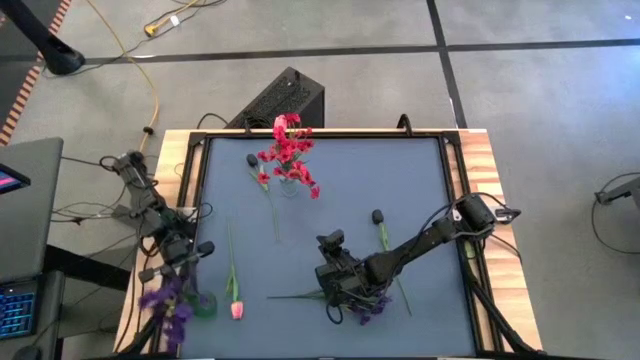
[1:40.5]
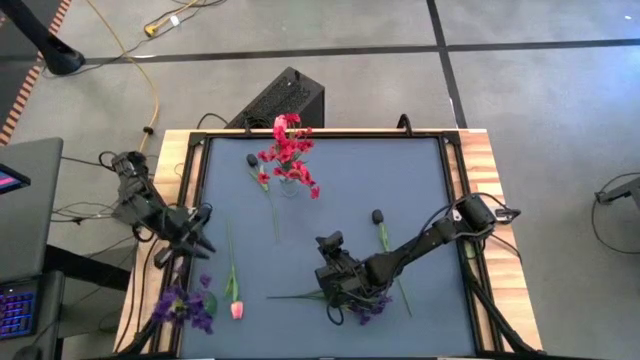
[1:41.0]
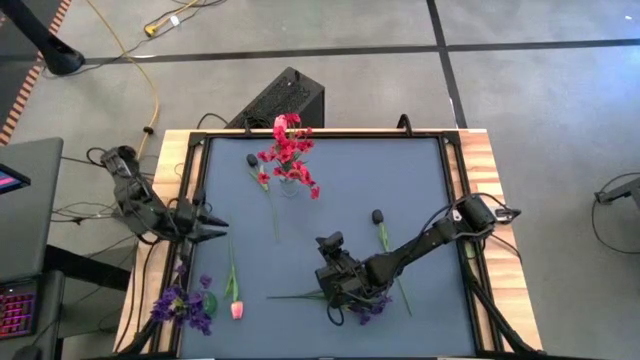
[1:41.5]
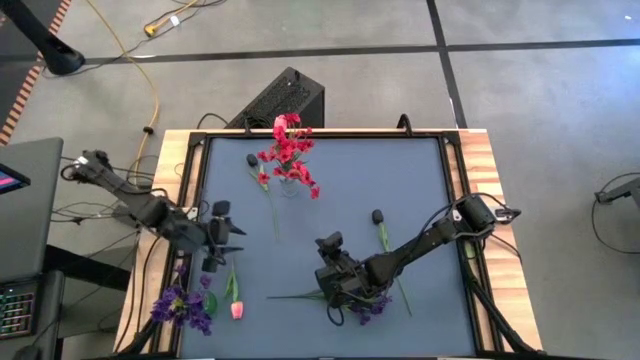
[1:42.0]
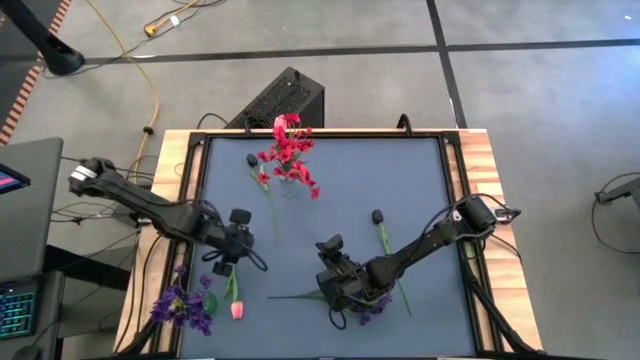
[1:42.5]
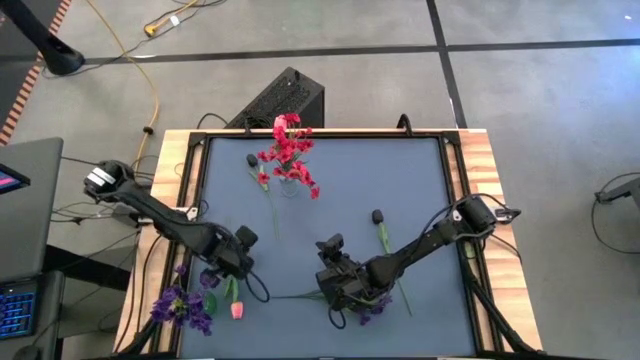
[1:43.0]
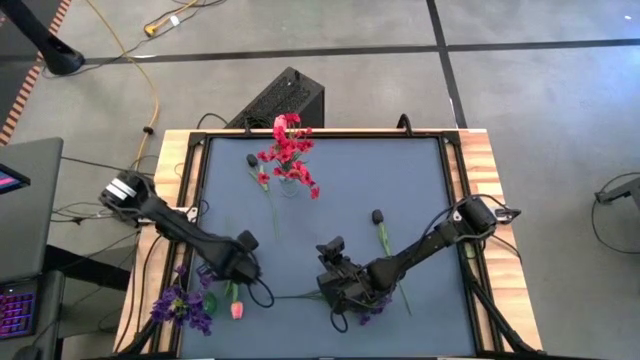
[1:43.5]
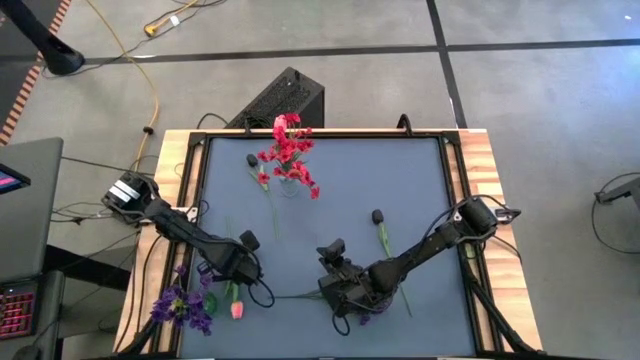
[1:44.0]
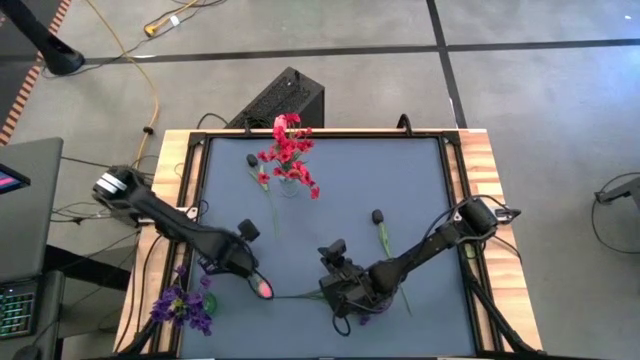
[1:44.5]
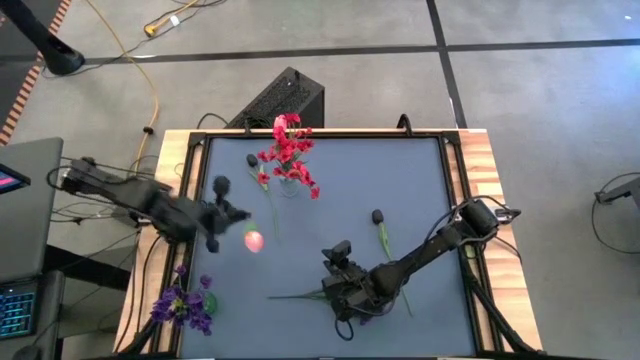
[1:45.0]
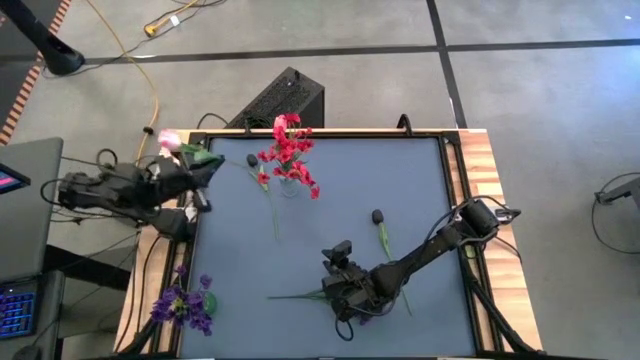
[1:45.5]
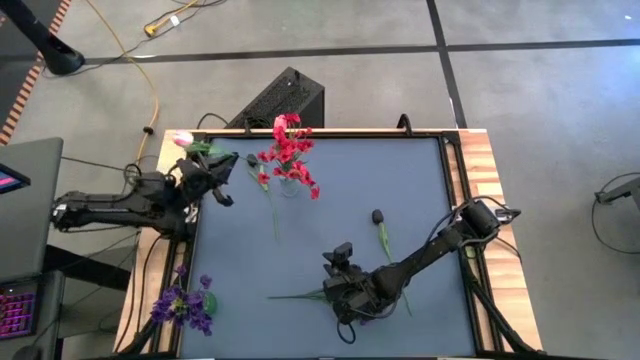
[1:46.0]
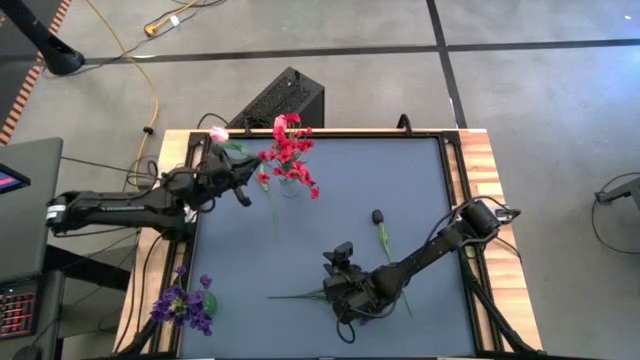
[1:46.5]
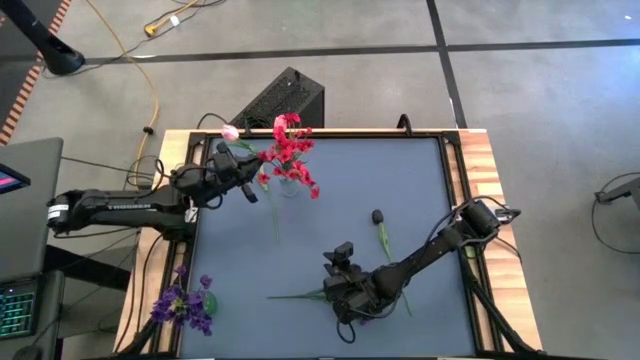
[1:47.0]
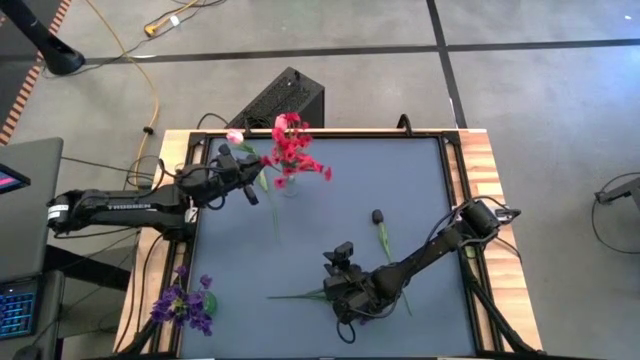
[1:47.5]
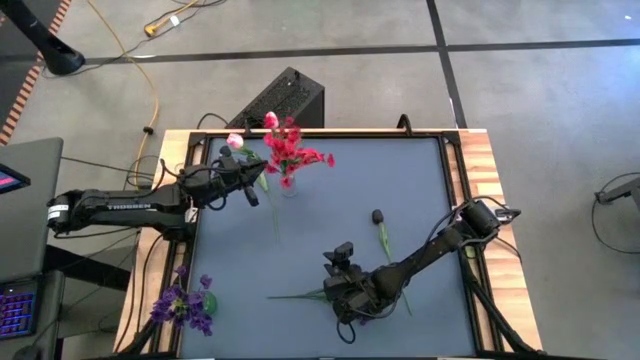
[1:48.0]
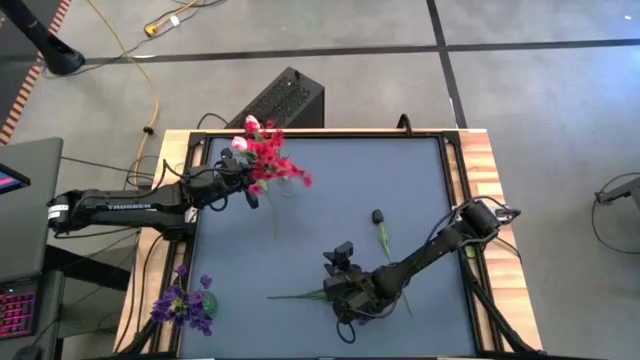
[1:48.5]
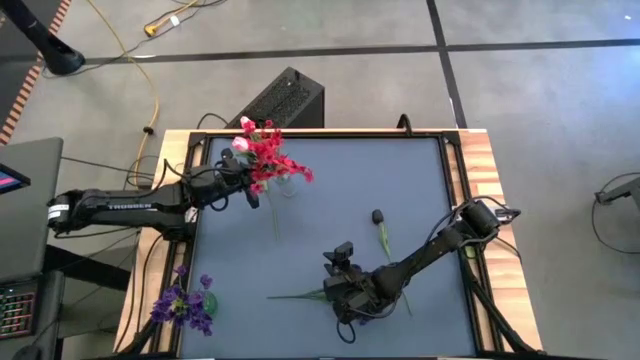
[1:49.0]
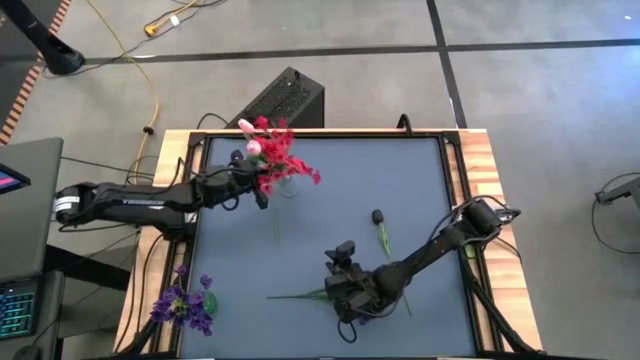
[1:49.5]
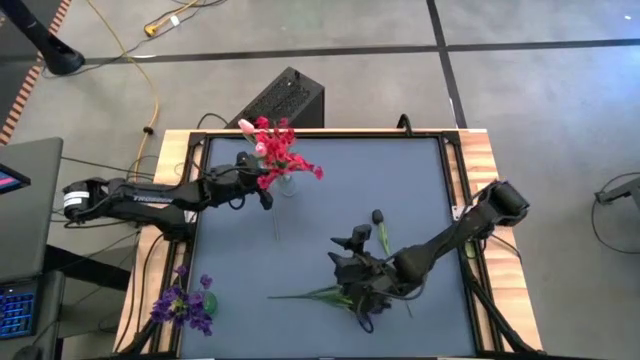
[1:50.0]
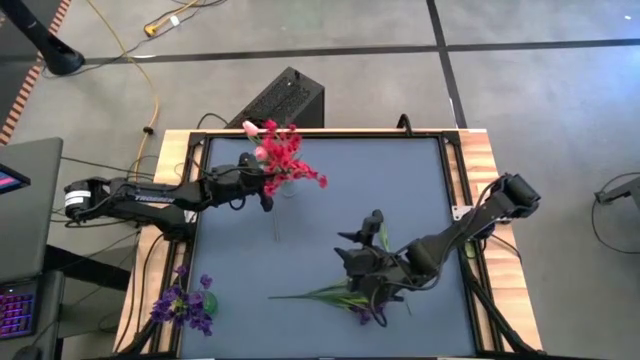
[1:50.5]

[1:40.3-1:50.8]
Task: Sort flowers into vase by color
Put the pink tulip into the transparent vase

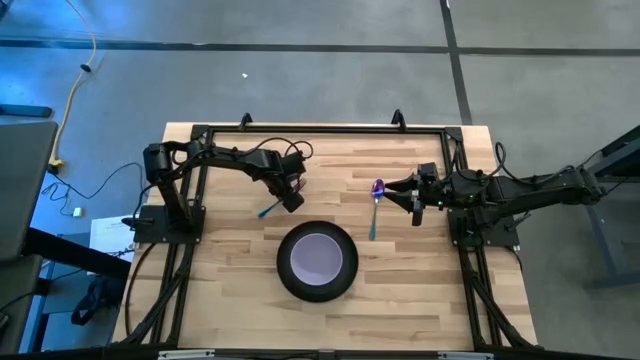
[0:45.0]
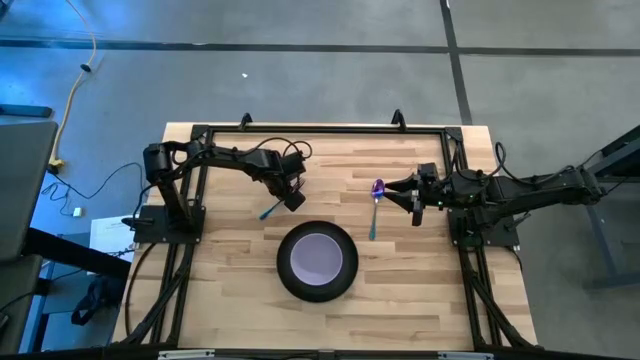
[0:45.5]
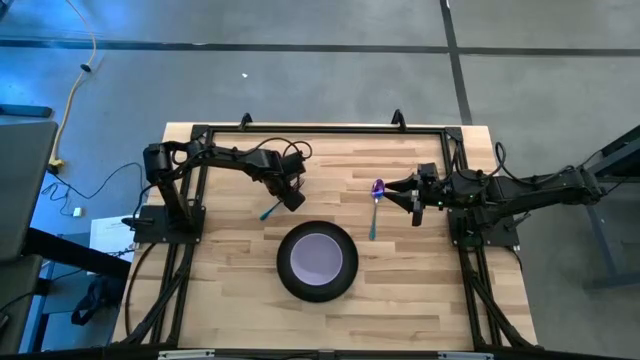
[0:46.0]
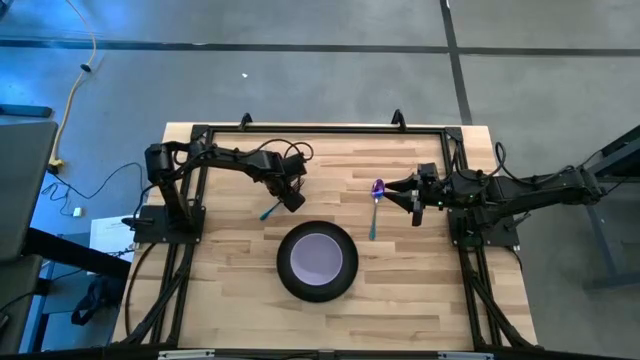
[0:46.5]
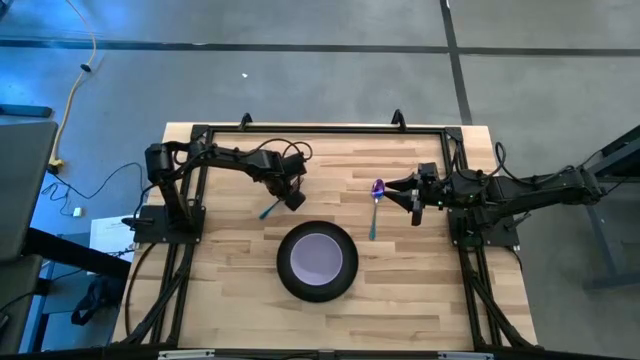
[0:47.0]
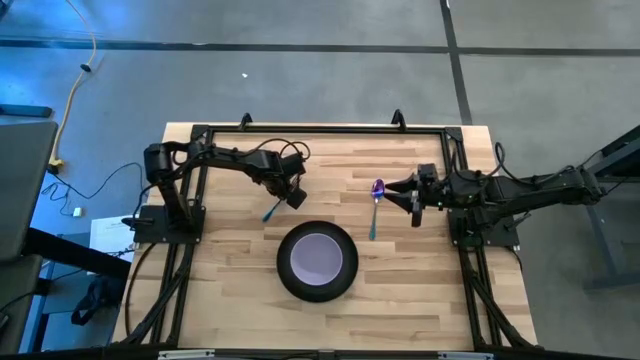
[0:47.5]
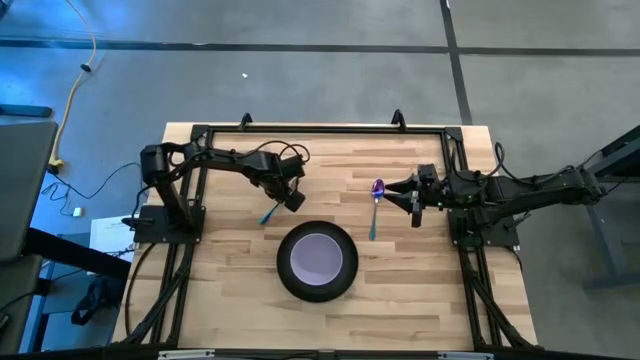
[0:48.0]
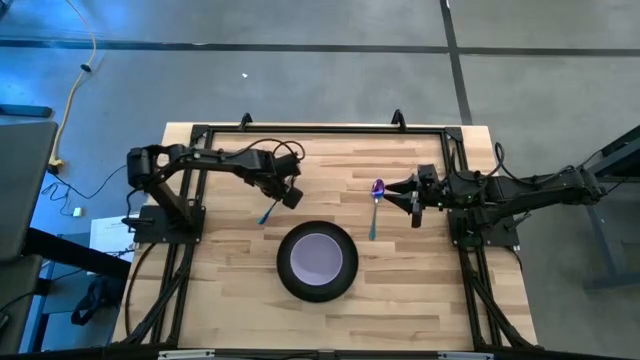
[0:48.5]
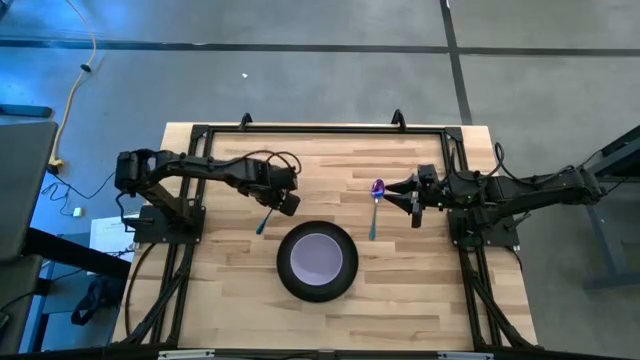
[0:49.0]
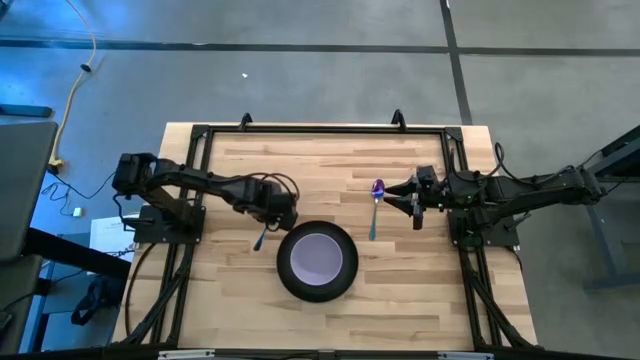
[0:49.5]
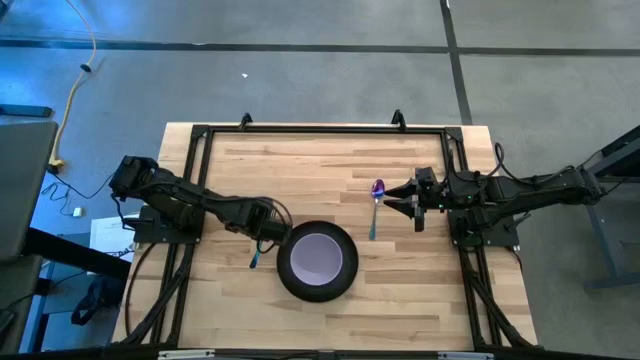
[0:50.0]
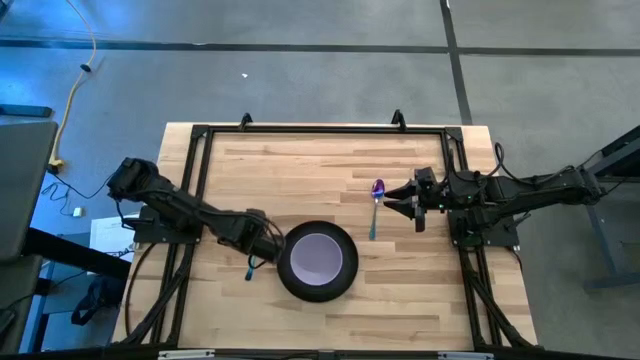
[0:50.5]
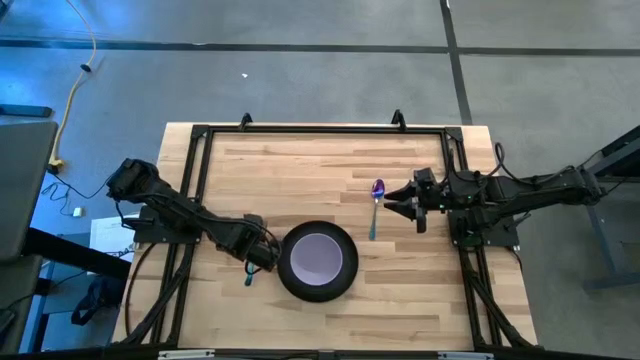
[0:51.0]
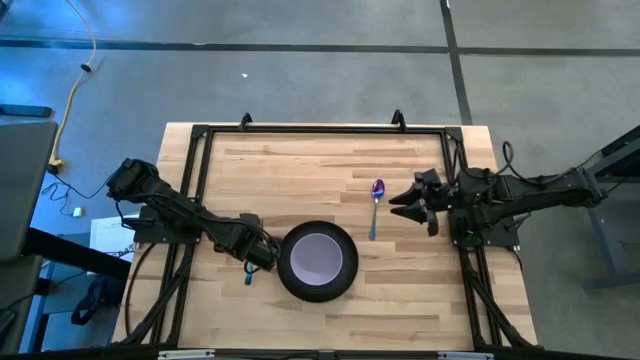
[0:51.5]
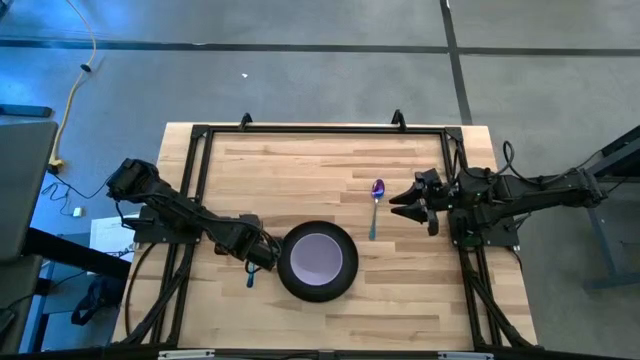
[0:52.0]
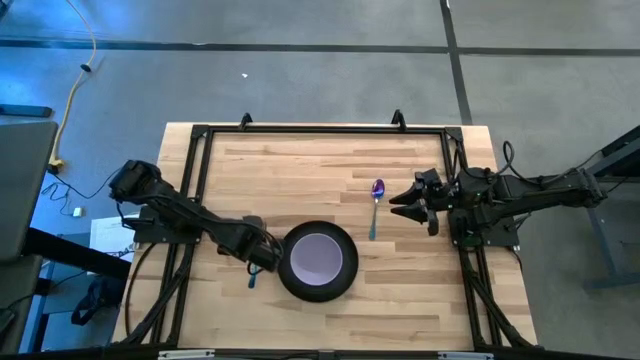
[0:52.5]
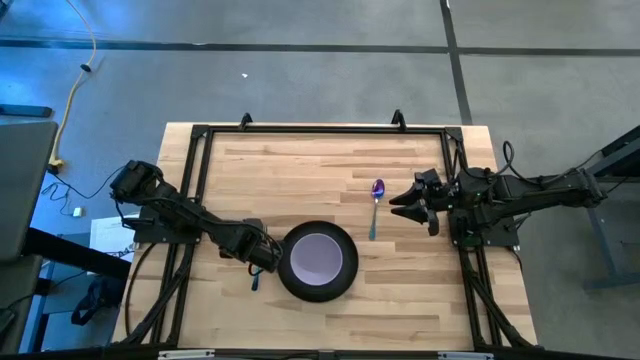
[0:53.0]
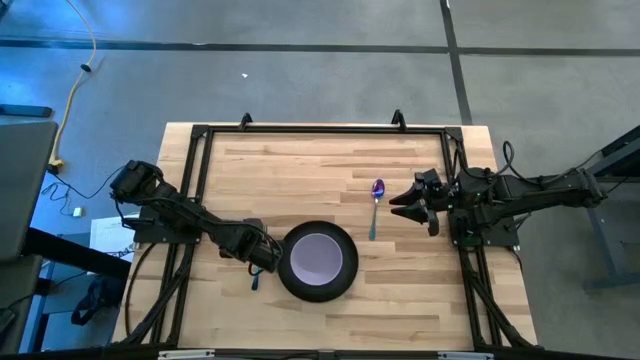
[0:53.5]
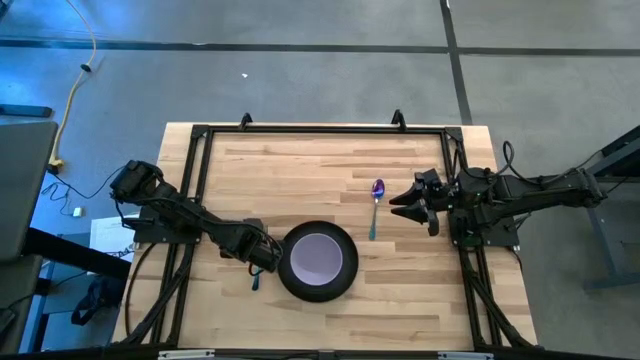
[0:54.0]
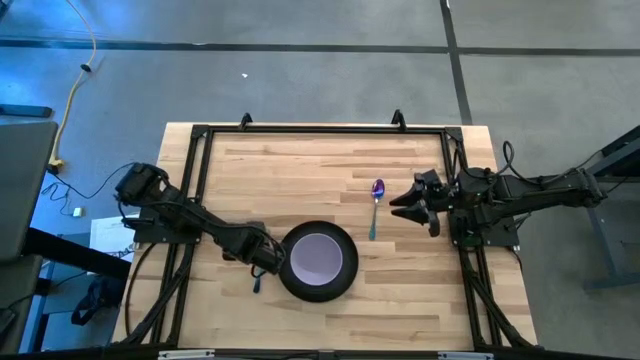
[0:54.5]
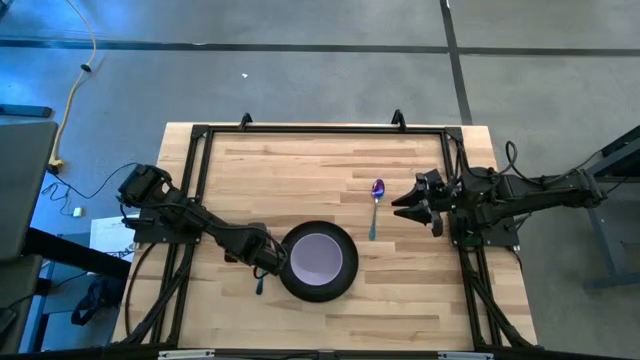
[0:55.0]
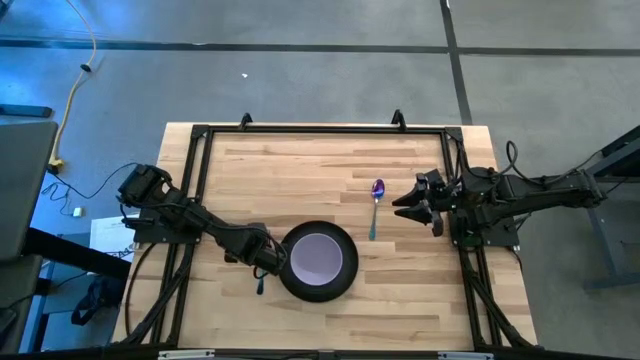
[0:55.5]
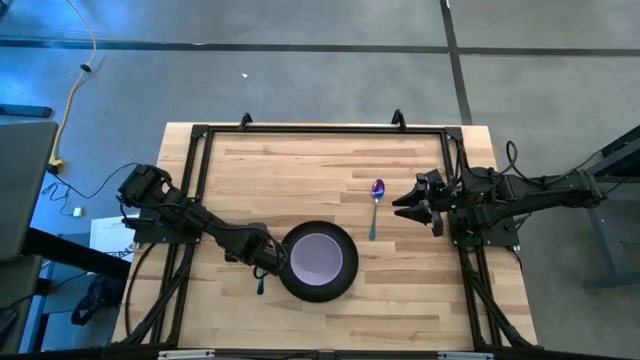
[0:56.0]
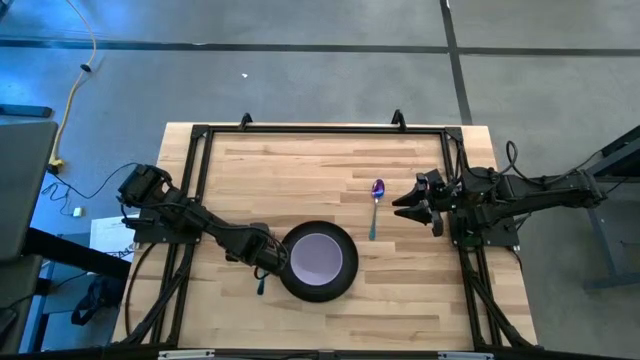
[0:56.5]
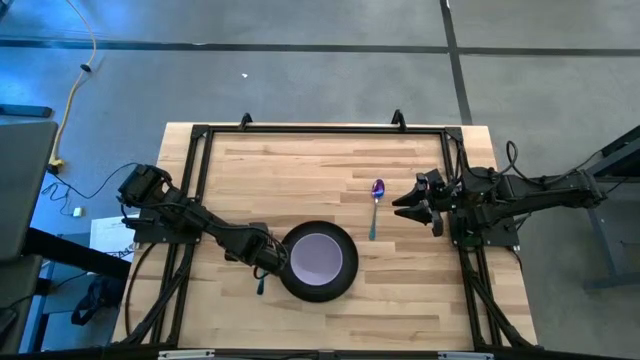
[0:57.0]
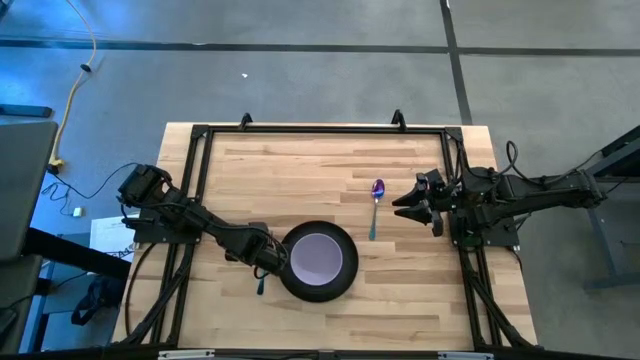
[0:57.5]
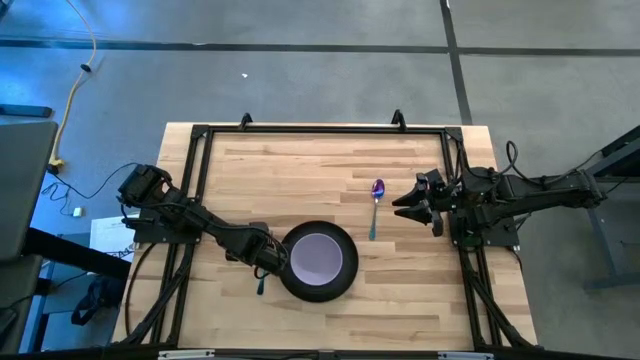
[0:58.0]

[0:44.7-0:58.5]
Task: Set table place
Put the violet fork to the left side of the black plate
